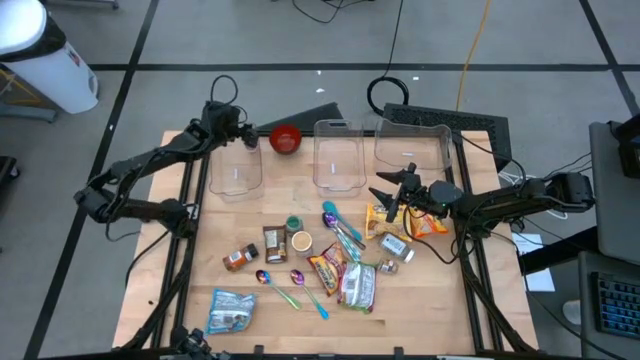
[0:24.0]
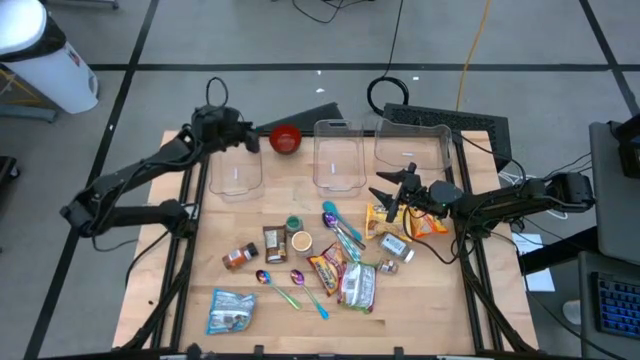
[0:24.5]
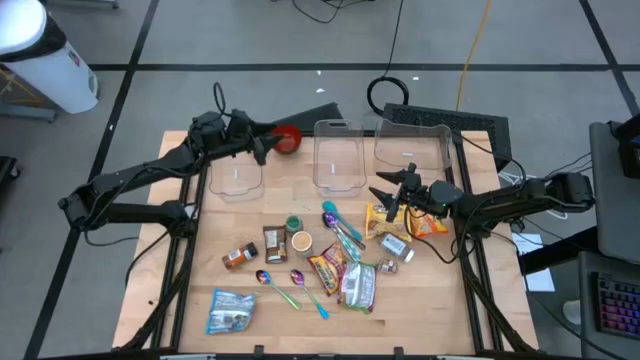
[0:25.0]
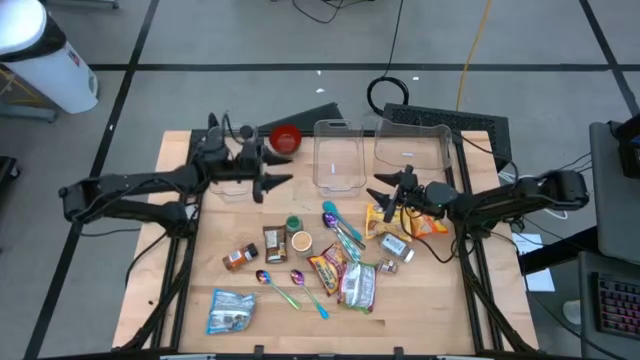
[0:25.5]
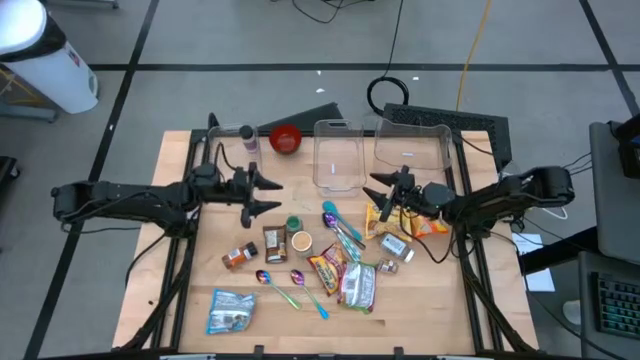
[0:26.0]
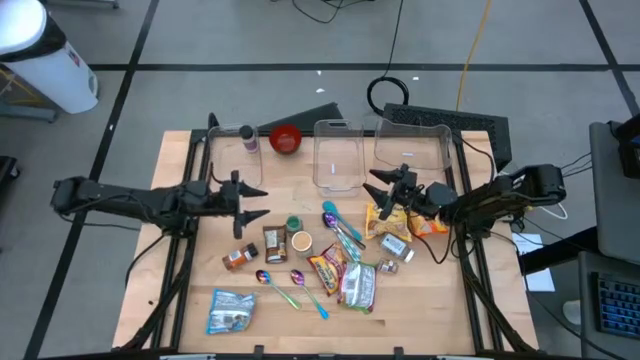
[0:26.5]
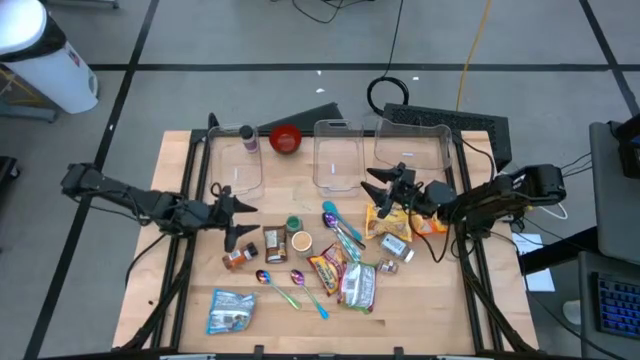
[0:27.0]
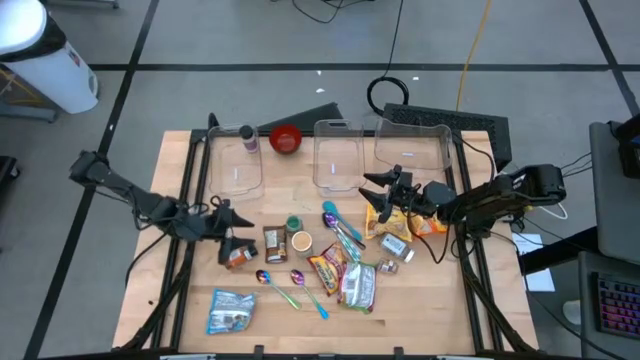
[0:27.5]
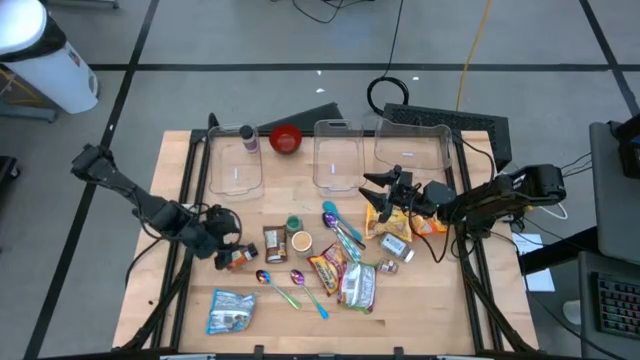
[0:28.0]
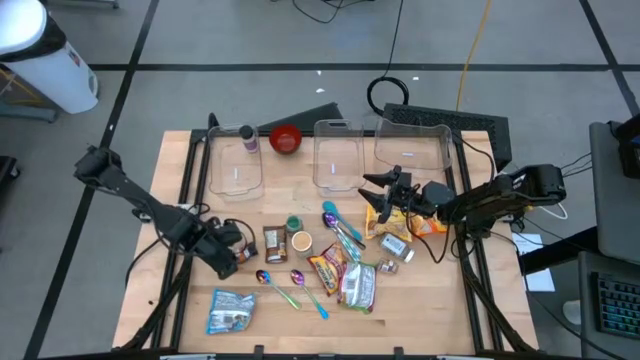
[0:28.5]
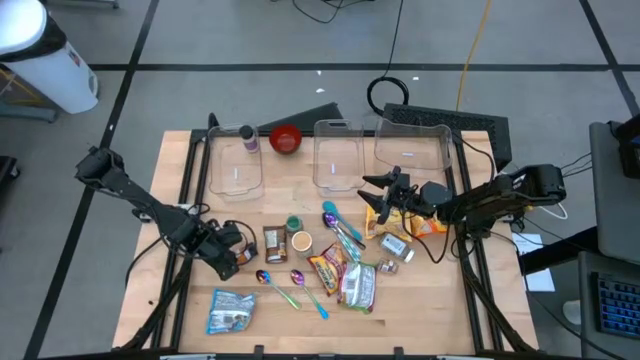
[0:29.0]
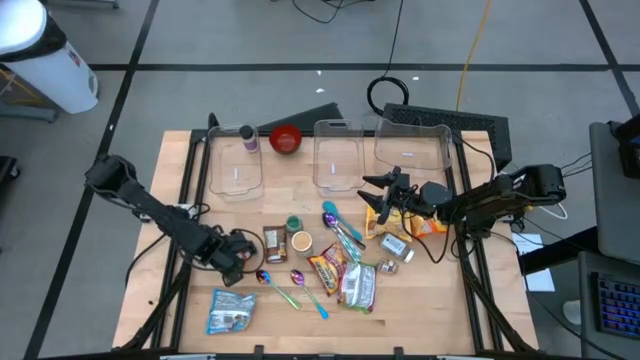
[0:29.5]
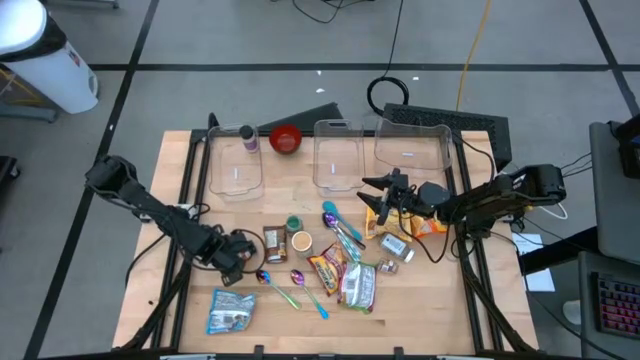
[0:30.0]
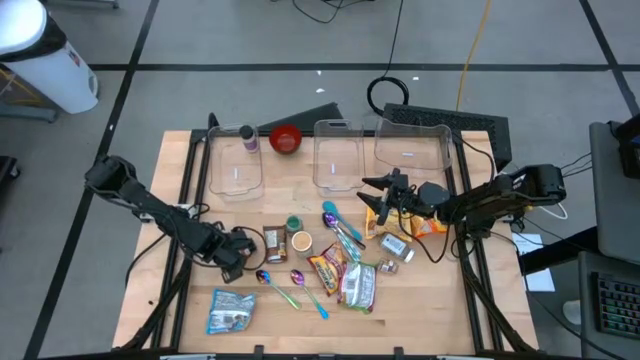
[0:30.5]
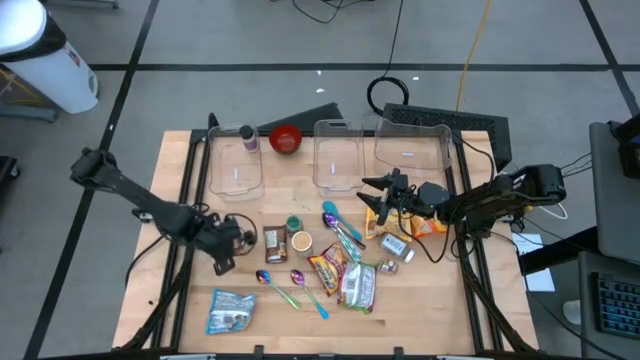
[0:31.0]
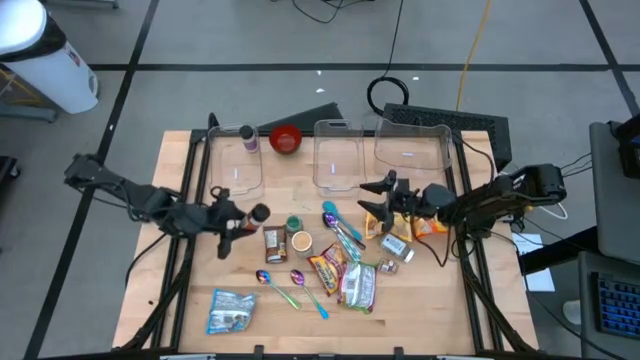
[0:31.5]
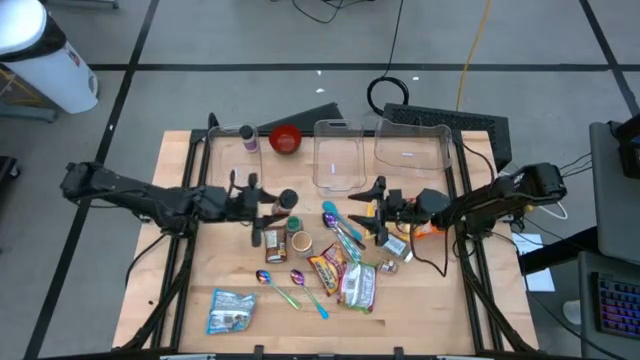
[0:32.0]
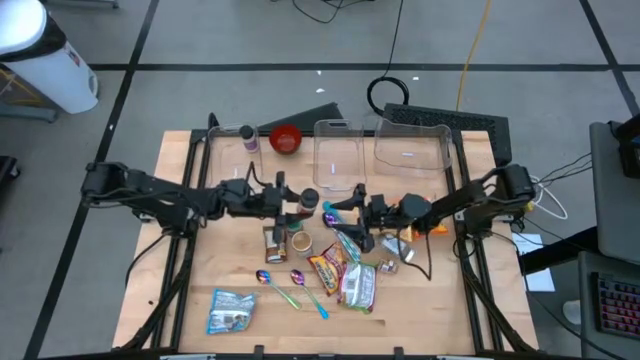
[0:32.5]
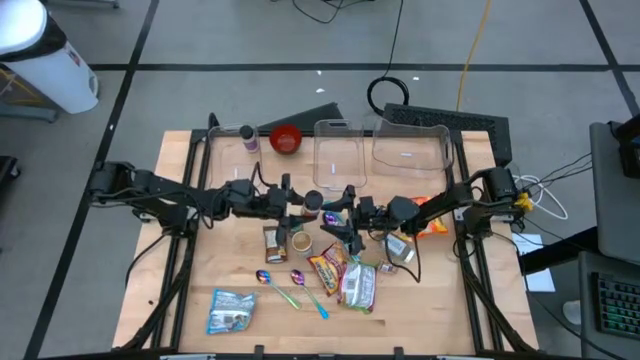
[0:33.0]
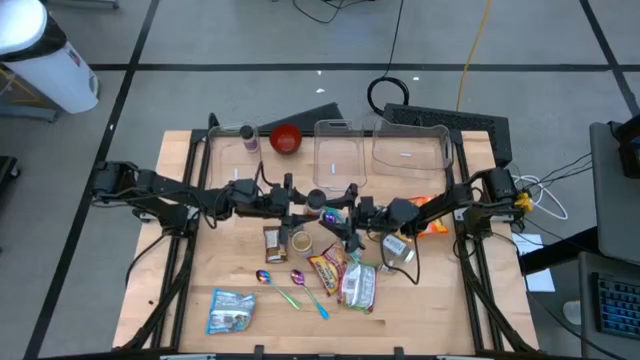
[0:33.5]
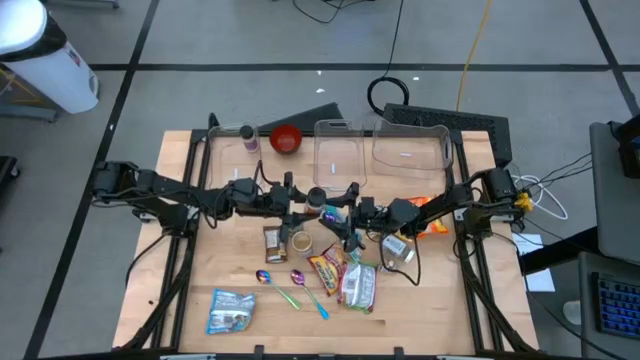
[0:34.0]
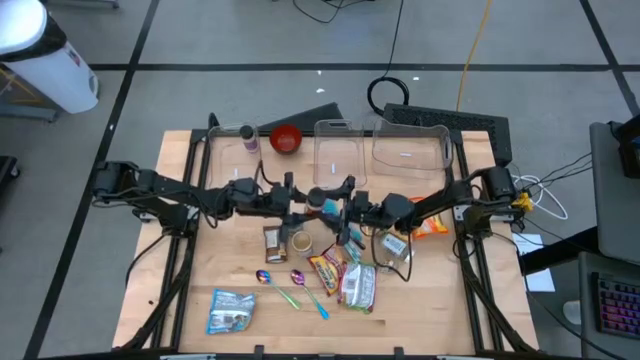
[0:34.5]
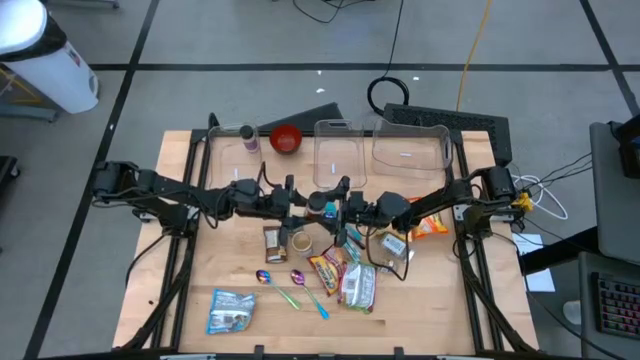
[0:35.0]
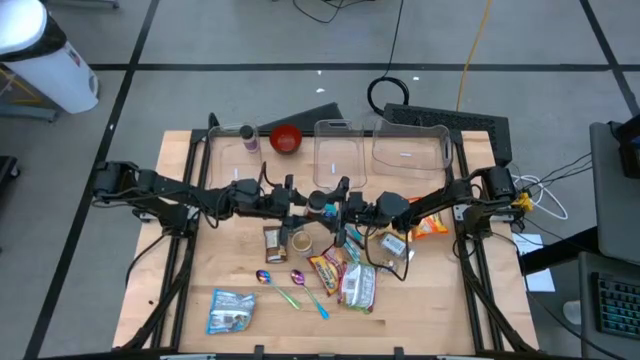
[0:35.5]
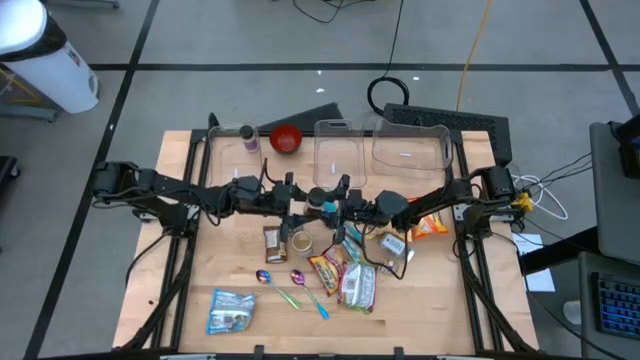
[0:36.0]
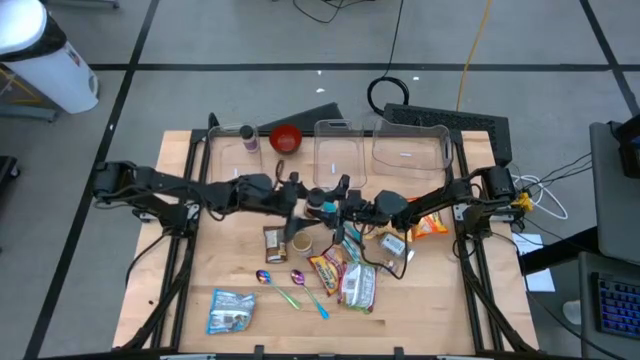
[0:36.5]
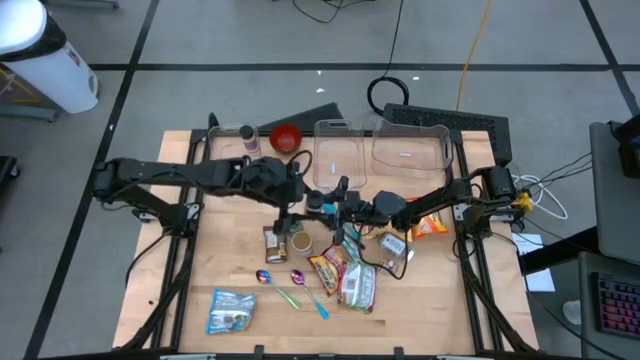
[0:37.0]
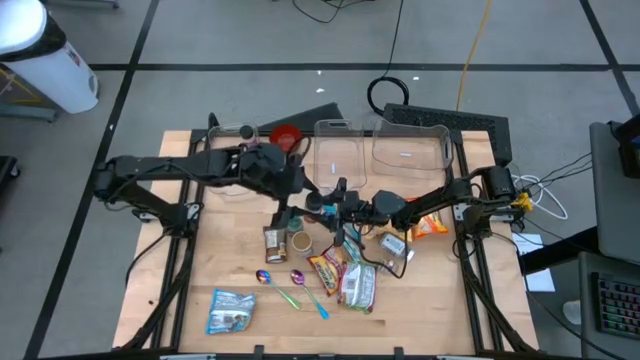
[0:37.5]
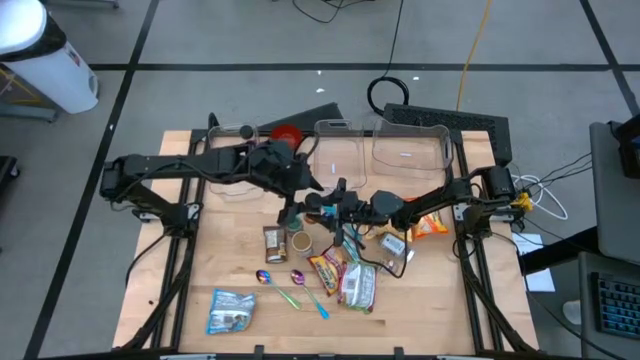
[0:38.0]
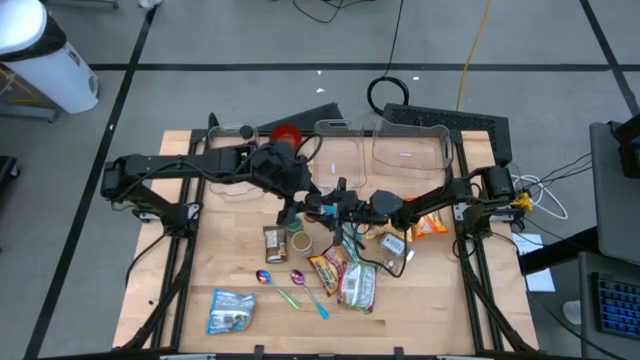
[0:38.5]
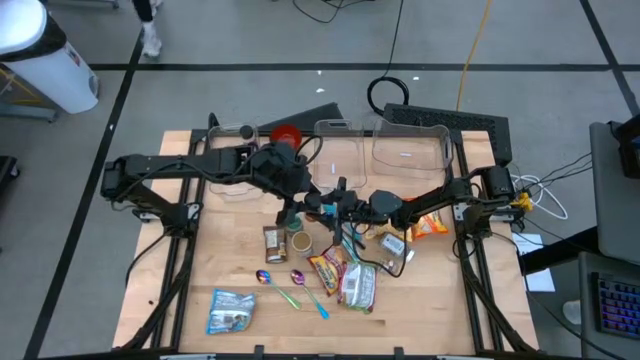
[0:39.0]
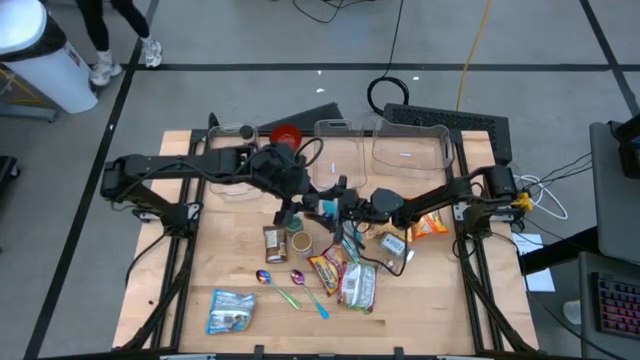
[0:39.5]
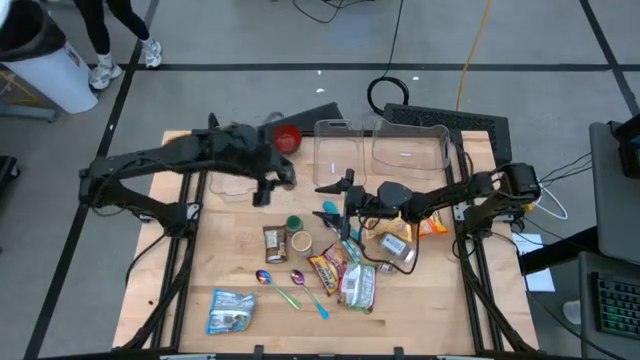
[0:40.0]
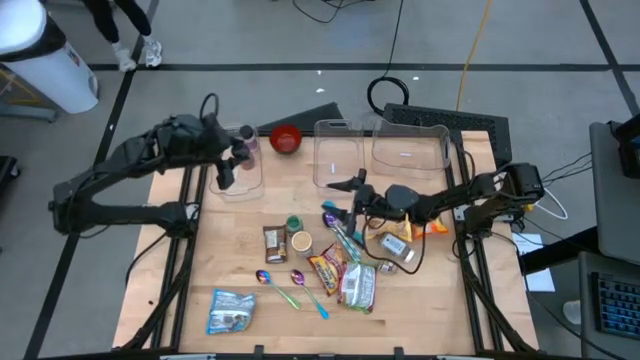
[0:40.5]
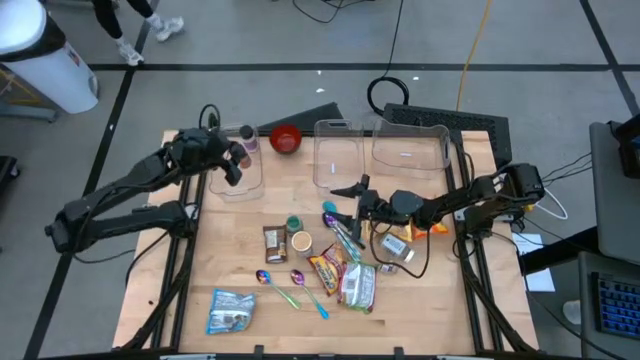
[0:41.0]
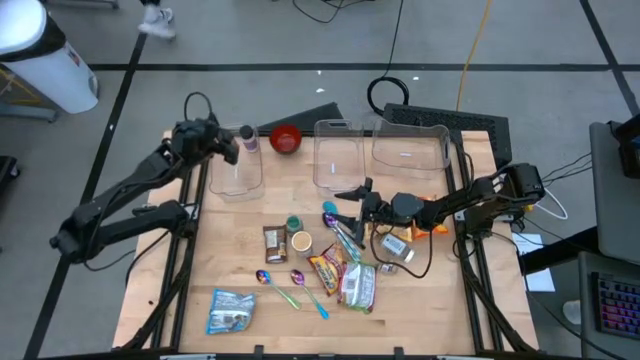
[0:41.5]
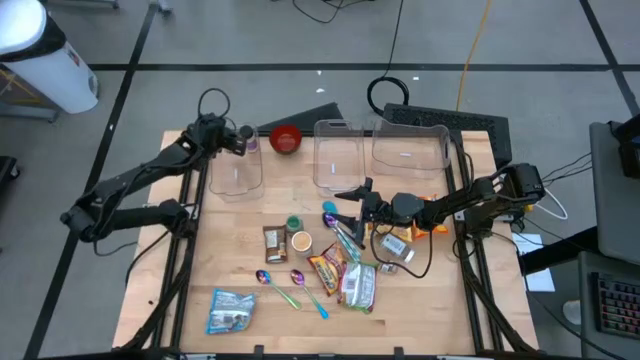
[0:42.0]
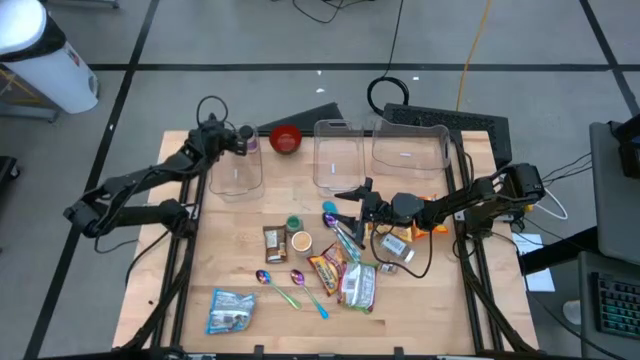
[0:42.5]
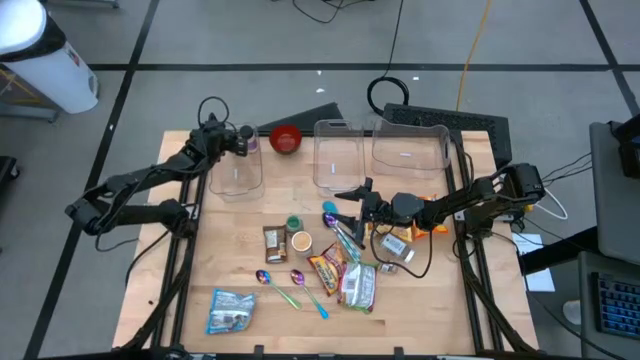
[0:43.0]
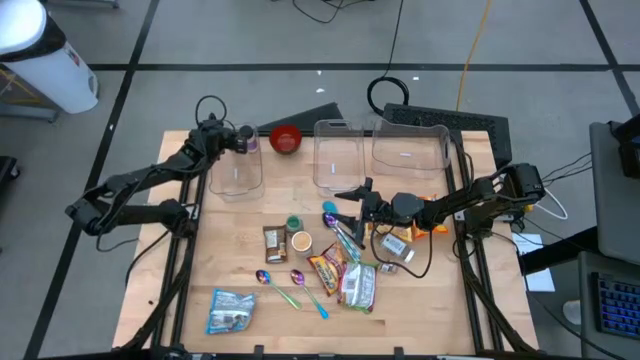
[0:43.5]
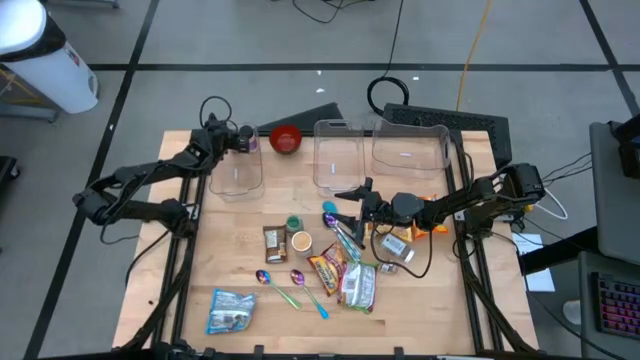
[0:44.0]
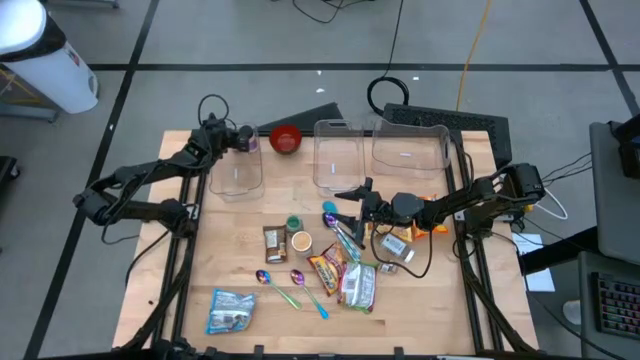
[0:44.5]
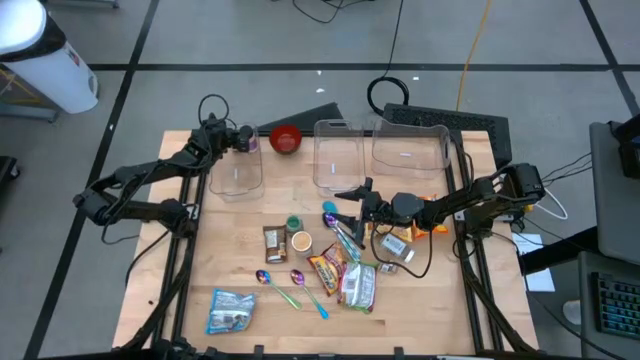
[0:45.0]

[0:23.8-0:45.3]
Task: Pick & Place Food Item
Put the orange seasoning bottle into the left transparent bin
